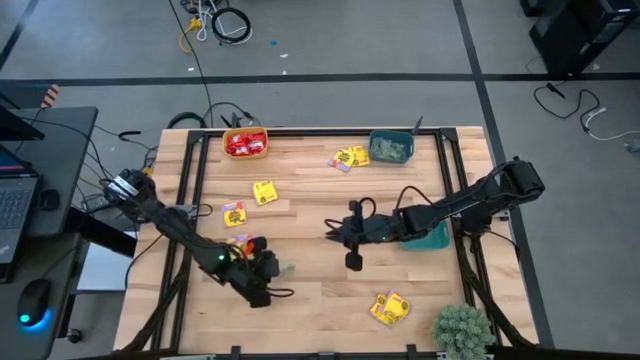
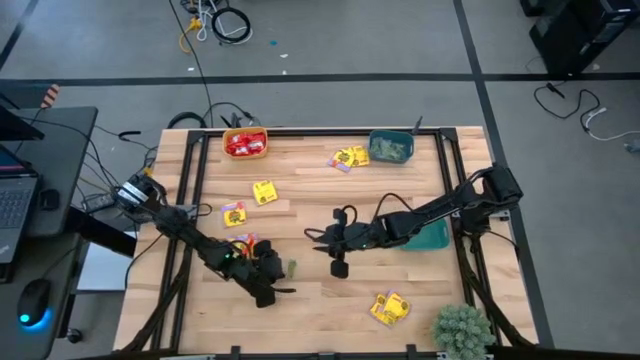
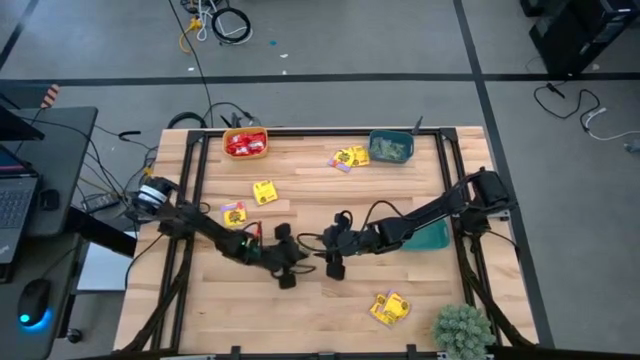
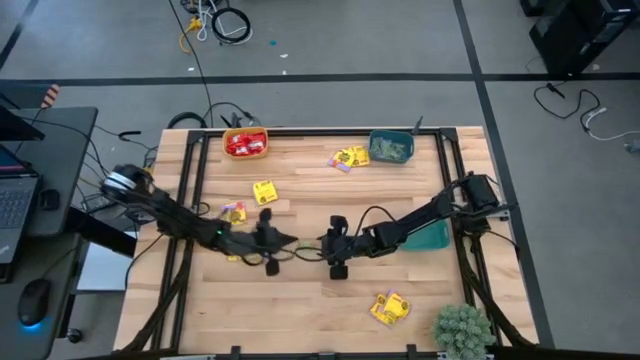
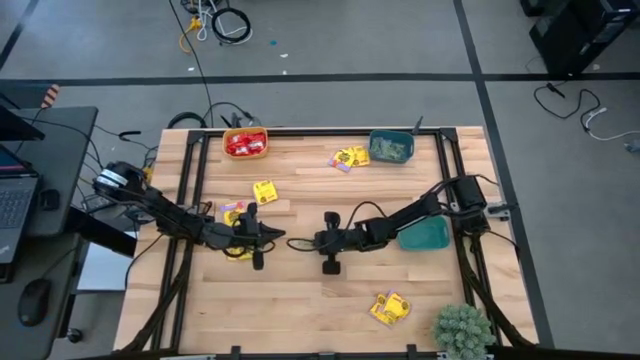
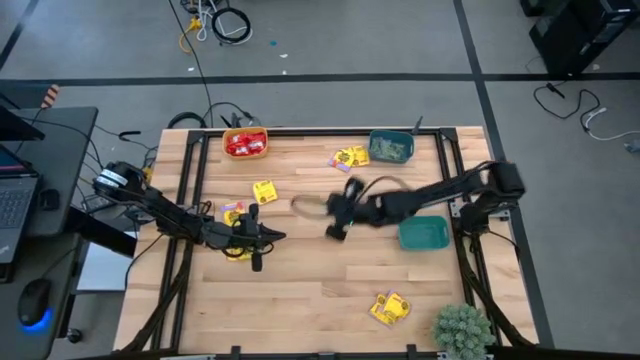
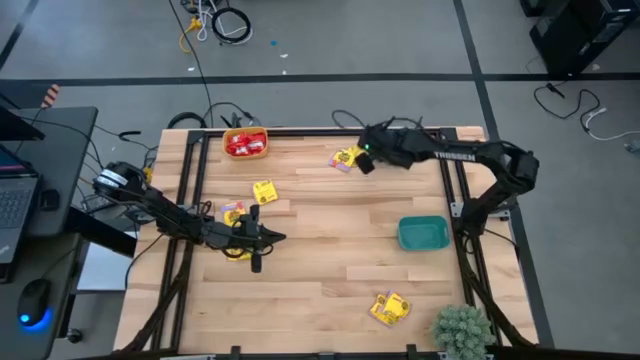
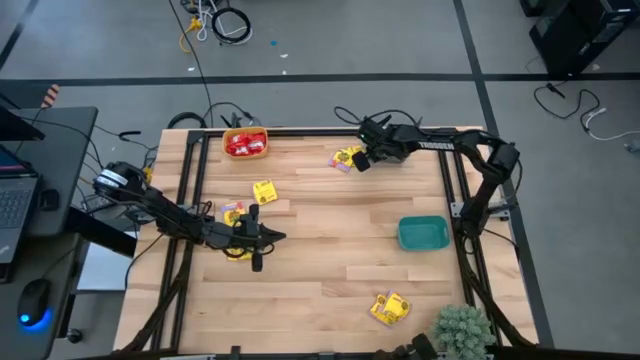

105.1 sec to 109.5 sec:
Task: Sort candy
Put the green gummy into the blue bin

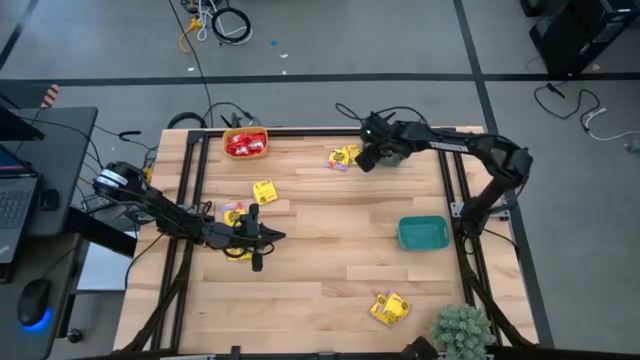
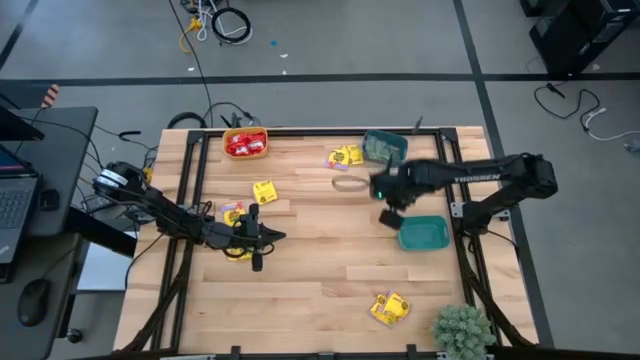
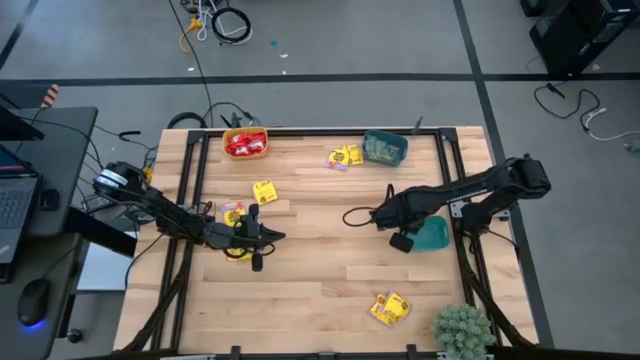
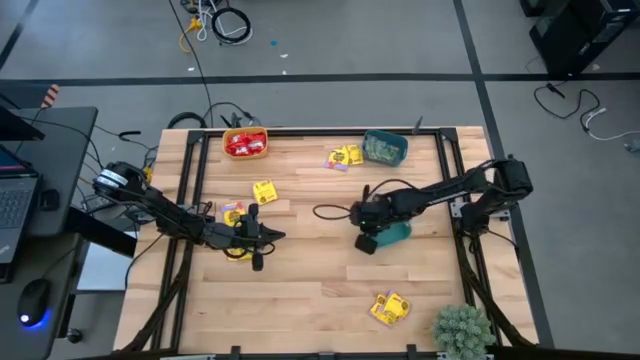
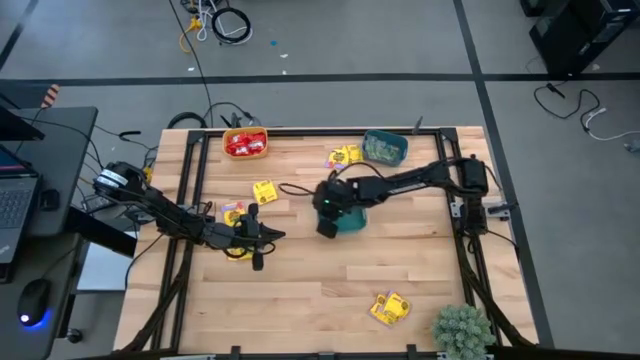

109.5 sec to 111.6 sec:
Move the green bin to the center of the table

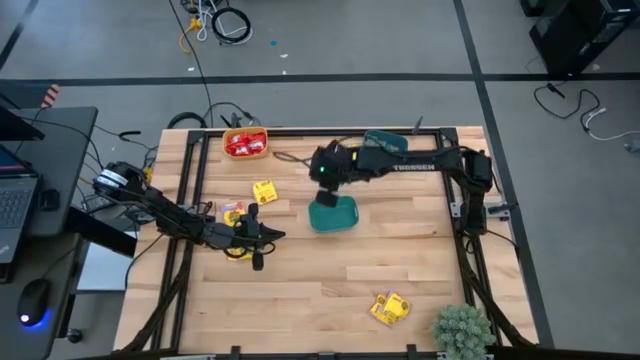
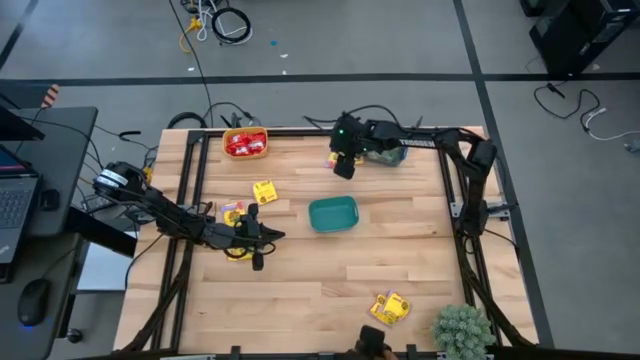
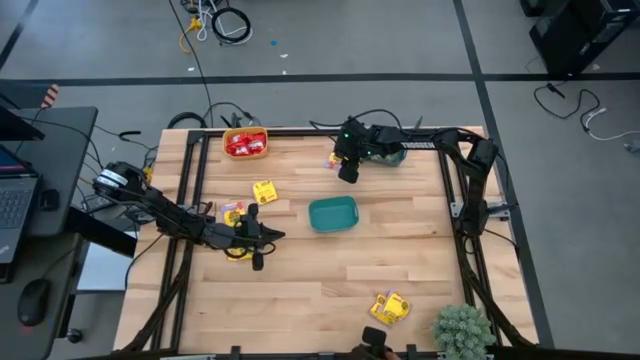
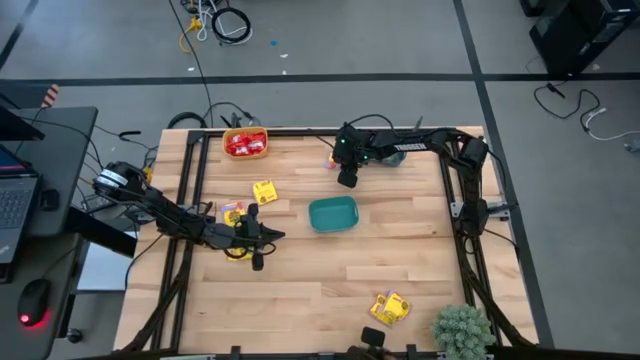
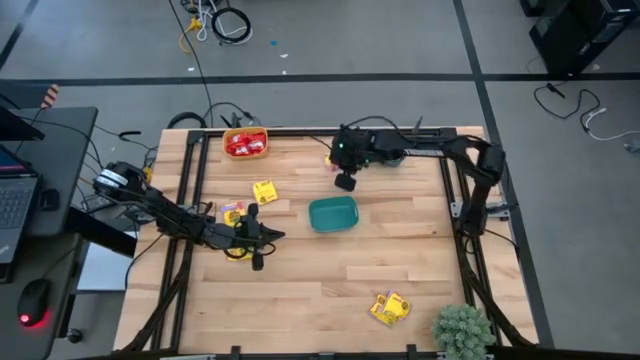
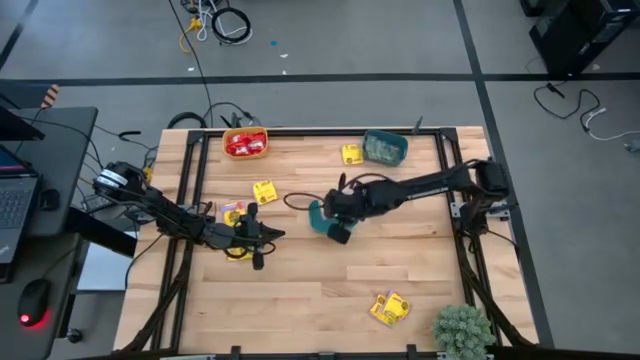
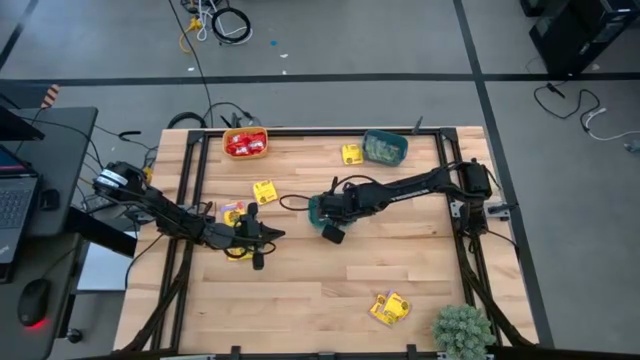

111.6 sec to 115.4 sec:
Put the yellow candy into the green bin

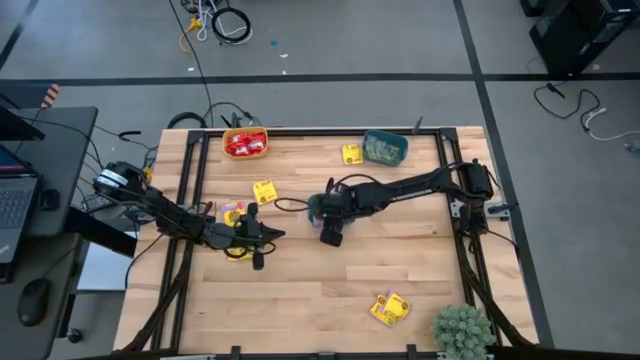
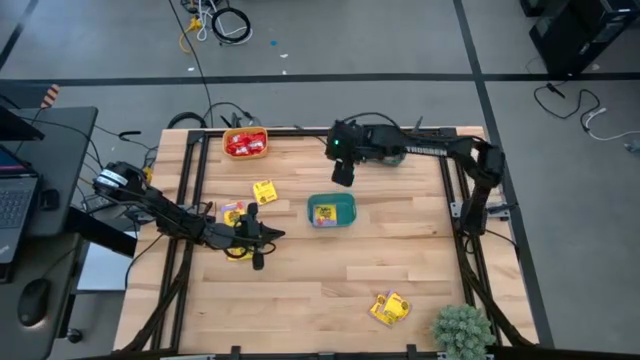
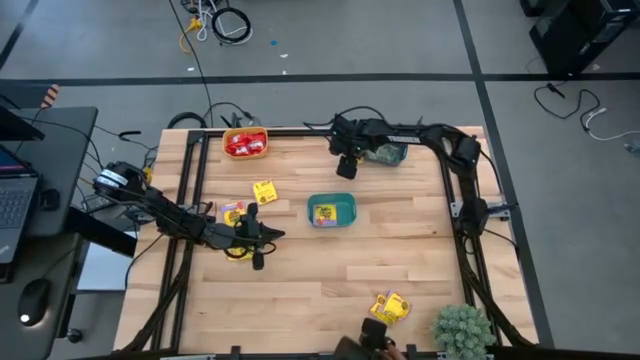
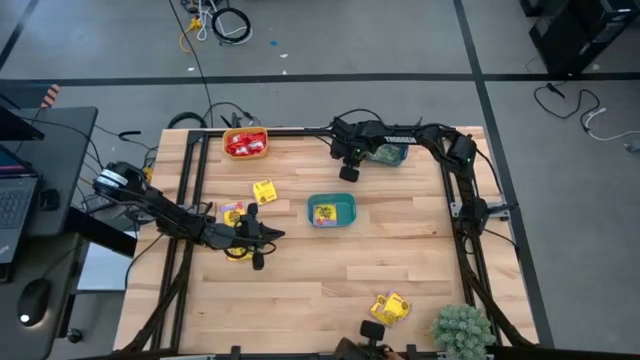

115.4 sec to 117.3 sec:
Put the yellow candy into the green bin

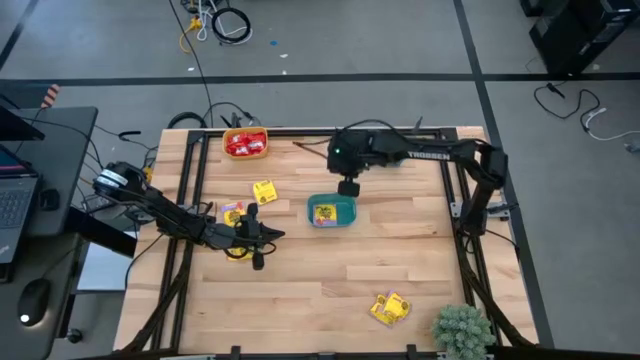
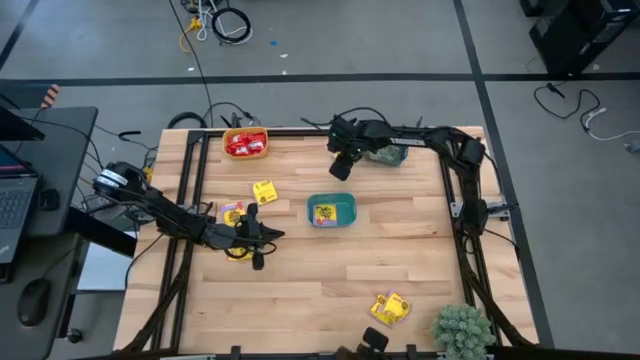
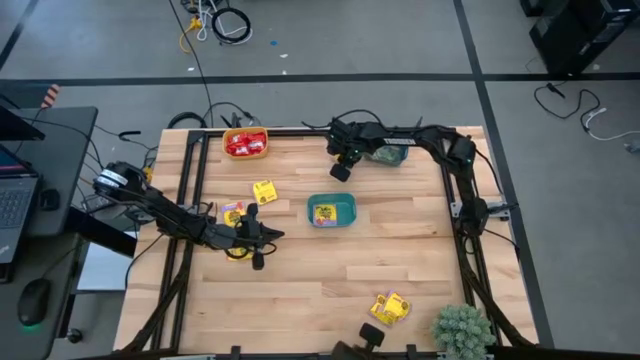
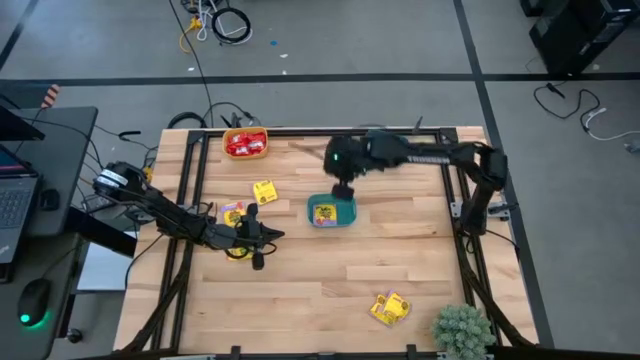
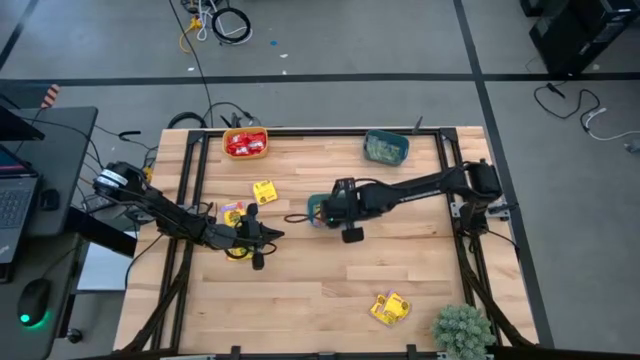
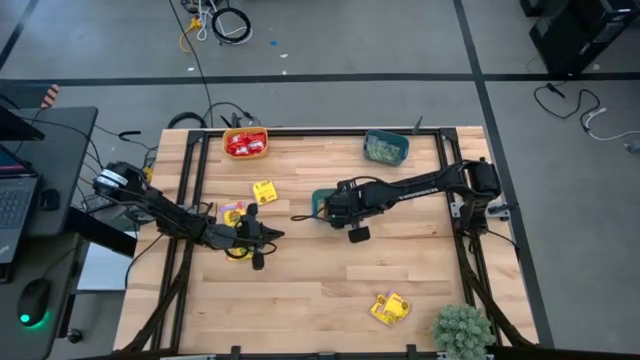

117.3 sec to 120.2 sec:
Put the yellow candy into the green bin

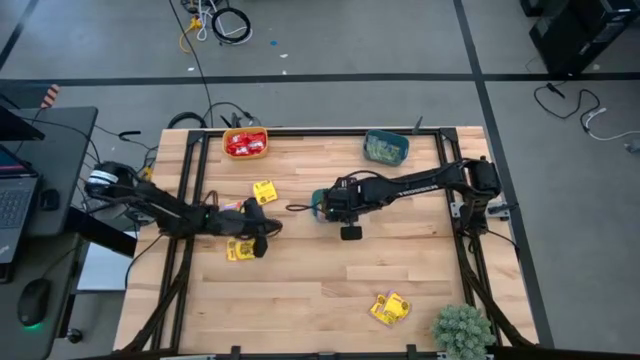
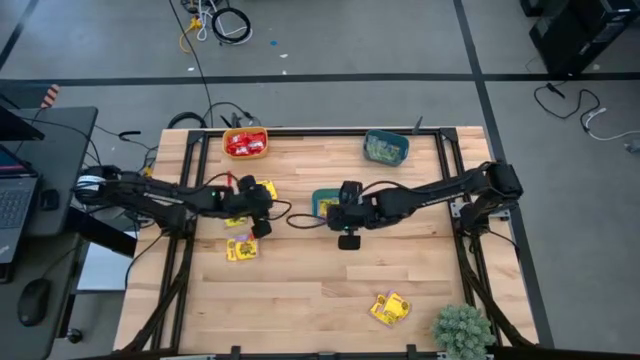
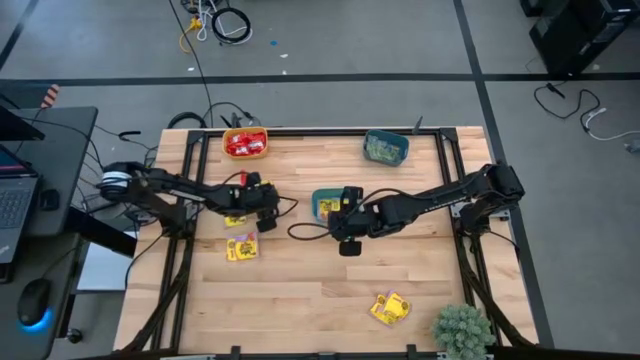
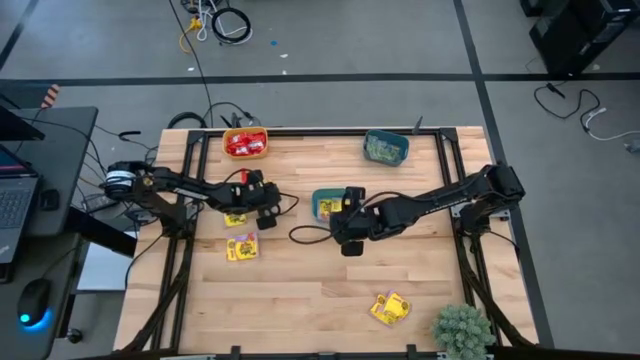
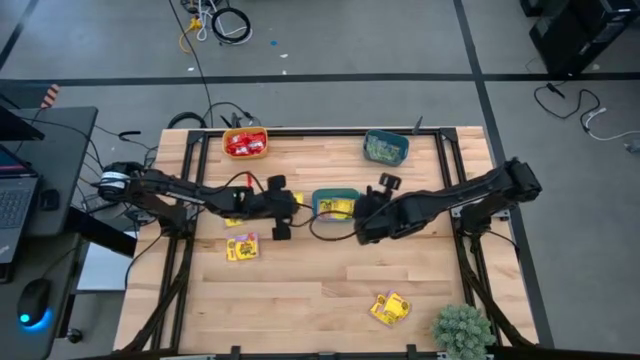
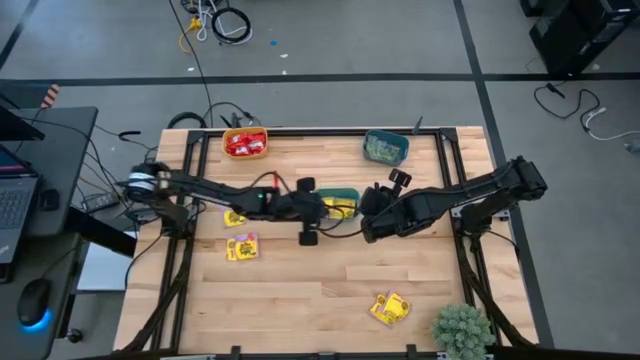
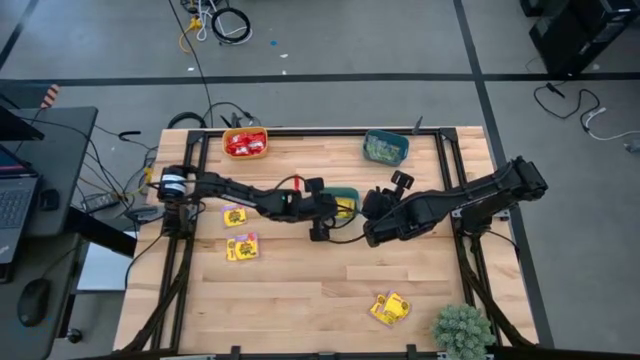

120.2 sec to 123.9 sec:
Put the yellow candy into the green bin

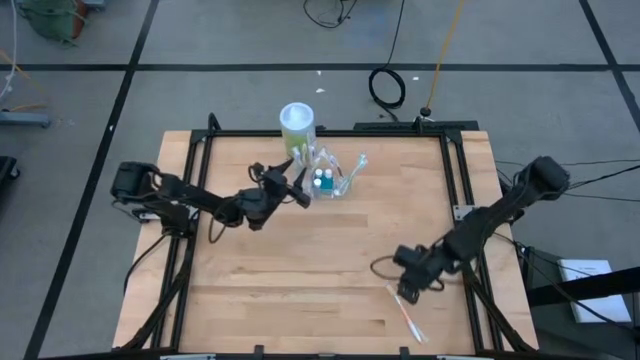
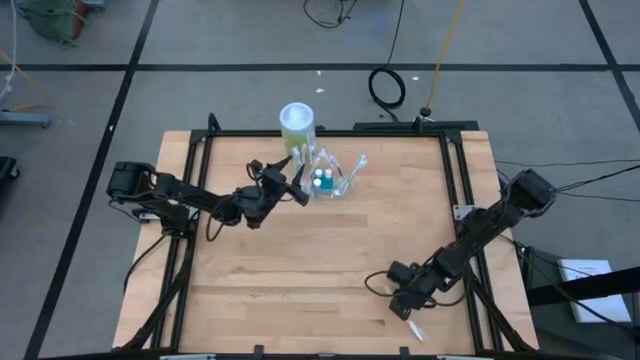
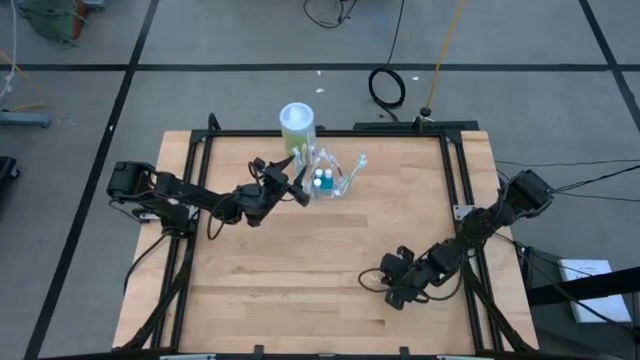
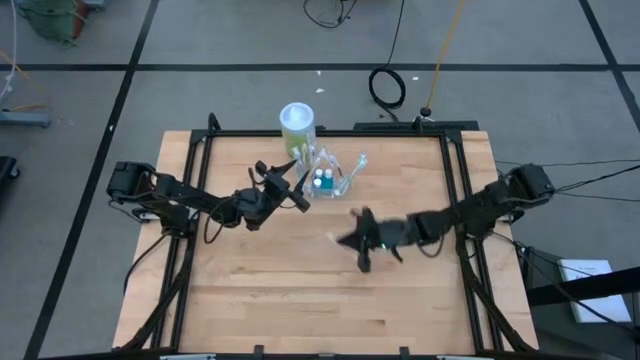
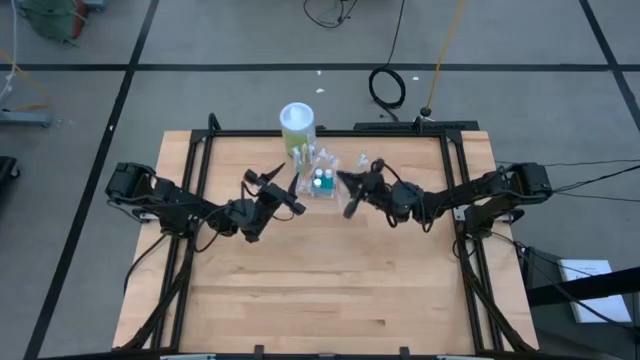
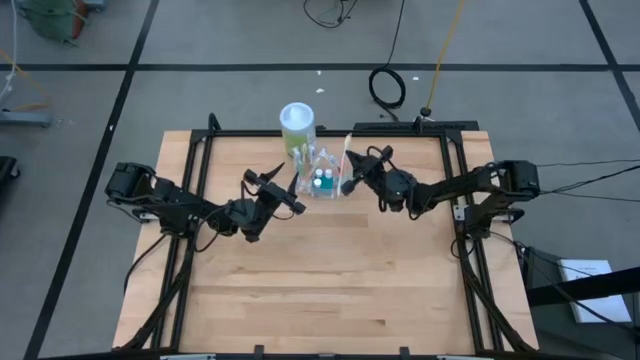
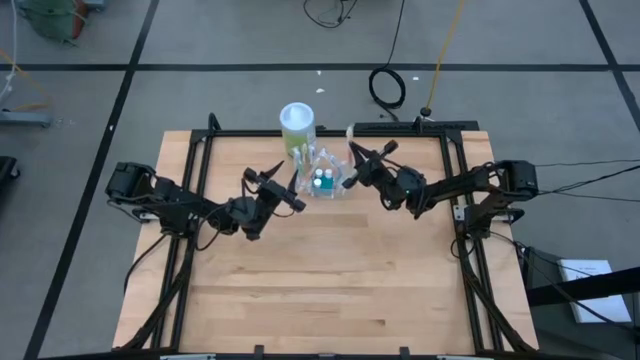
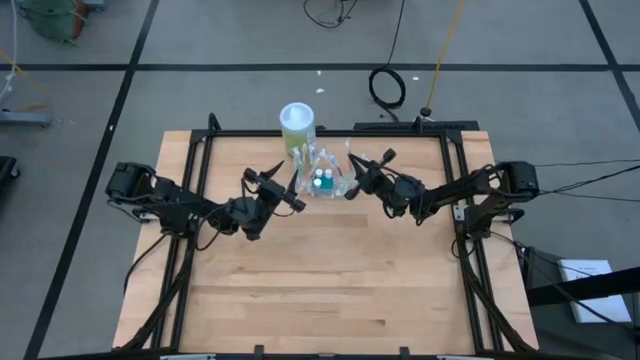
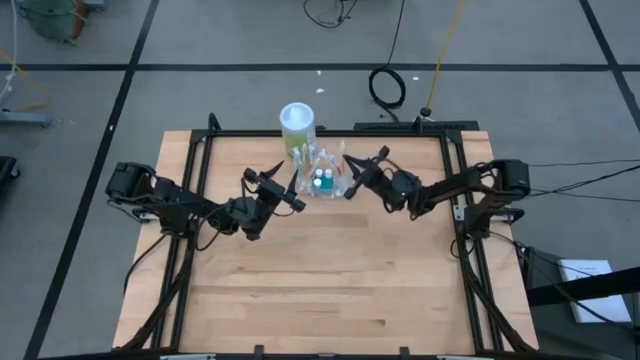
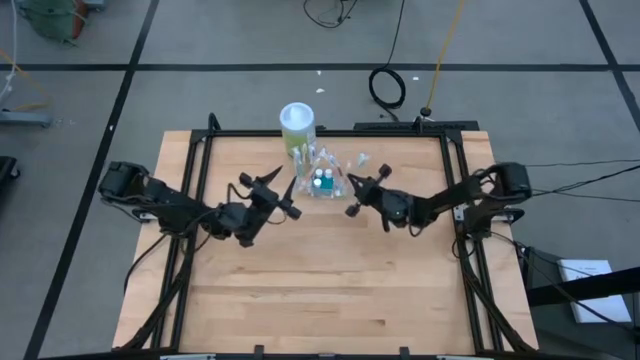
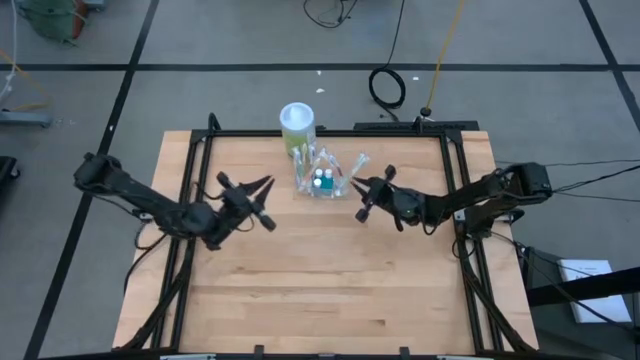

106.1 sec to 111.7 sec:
Task: Pick & Place toothbrushing station
Put the orange toothbrush into the right of the transparent organizer
